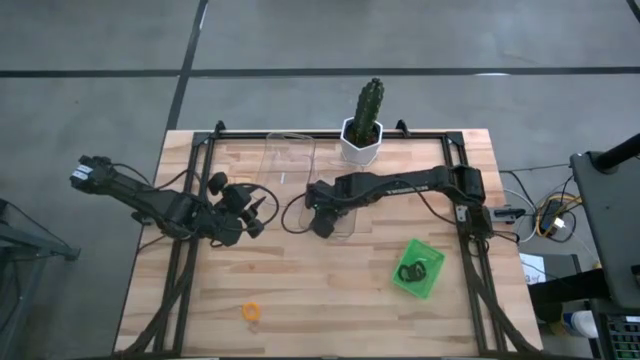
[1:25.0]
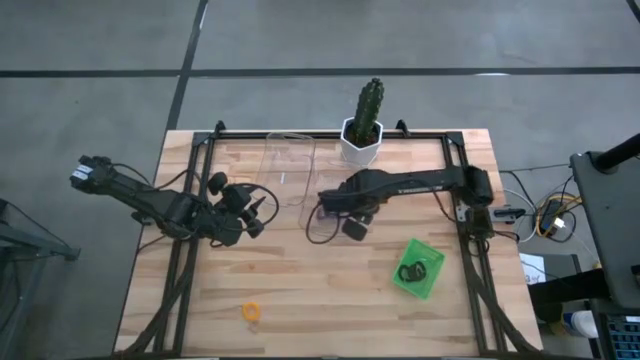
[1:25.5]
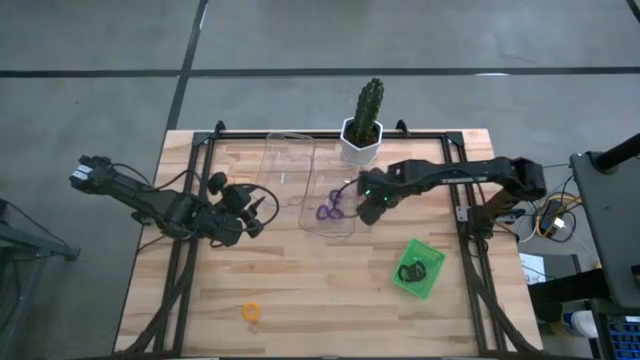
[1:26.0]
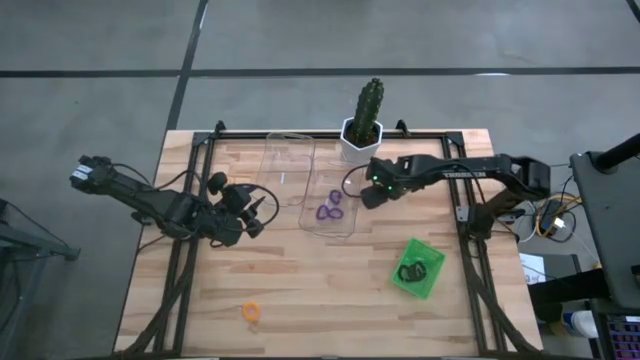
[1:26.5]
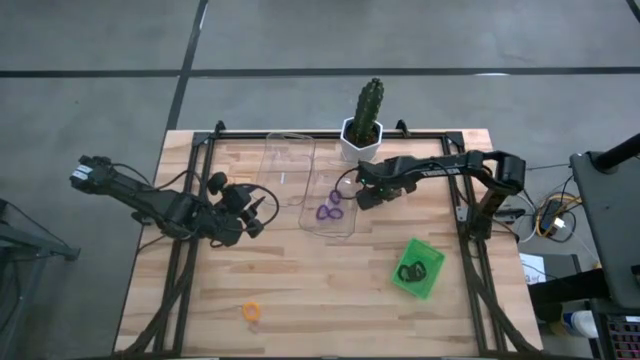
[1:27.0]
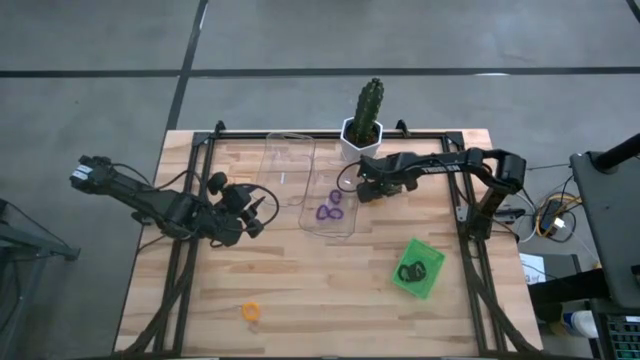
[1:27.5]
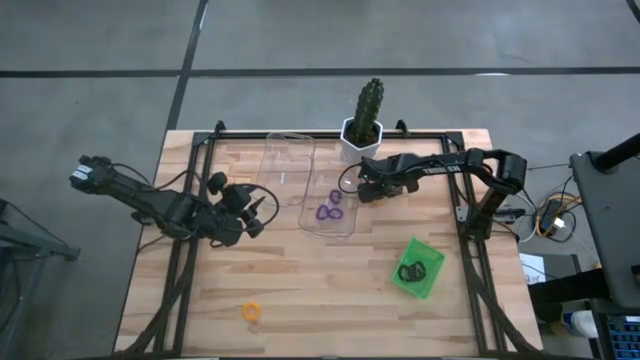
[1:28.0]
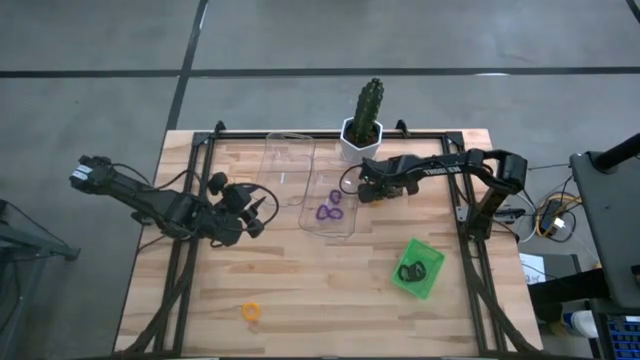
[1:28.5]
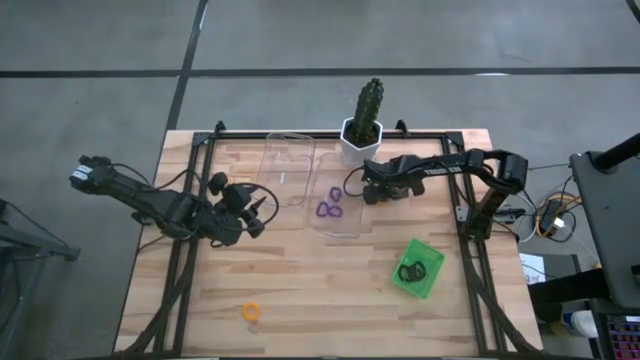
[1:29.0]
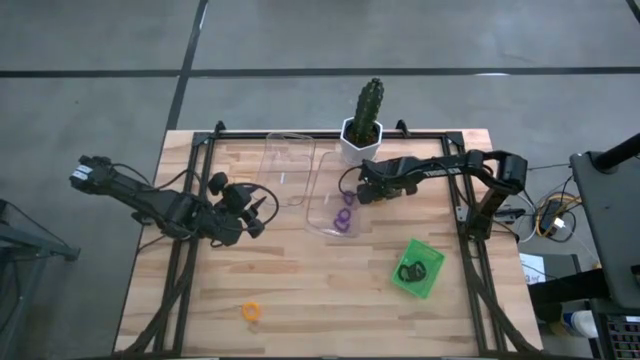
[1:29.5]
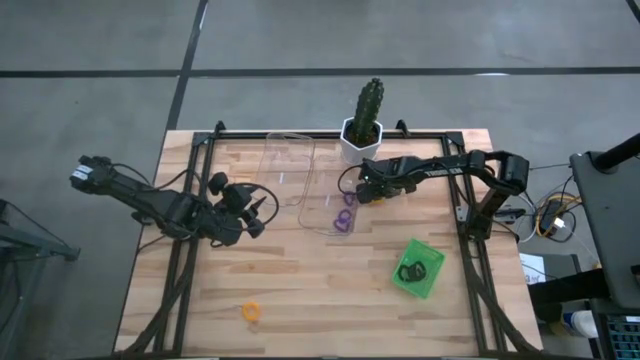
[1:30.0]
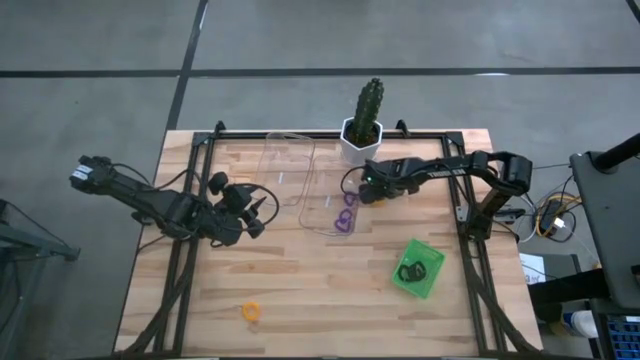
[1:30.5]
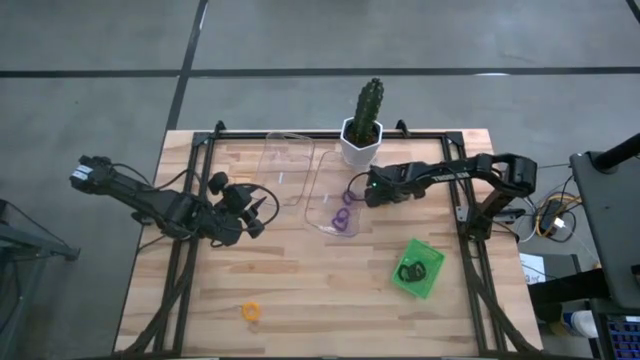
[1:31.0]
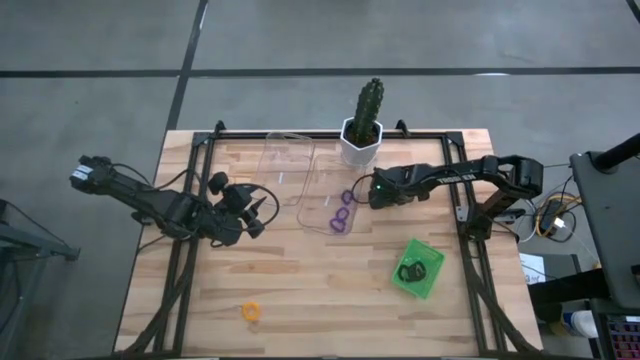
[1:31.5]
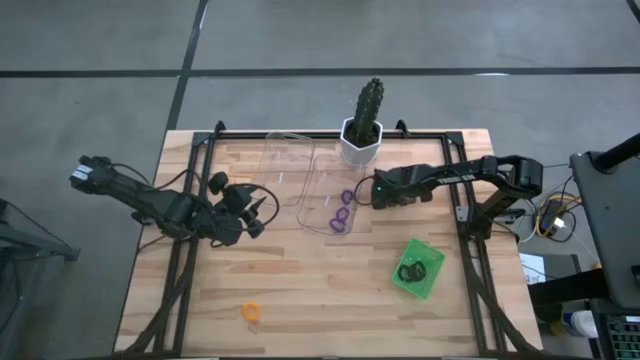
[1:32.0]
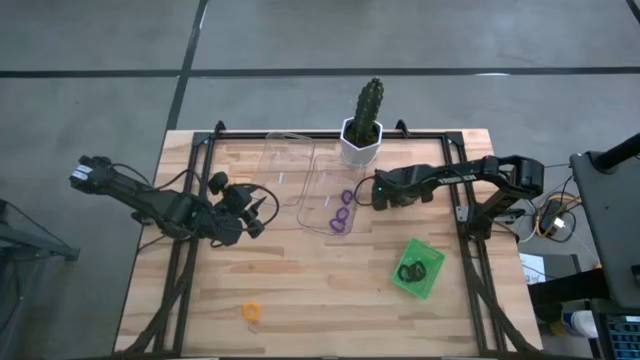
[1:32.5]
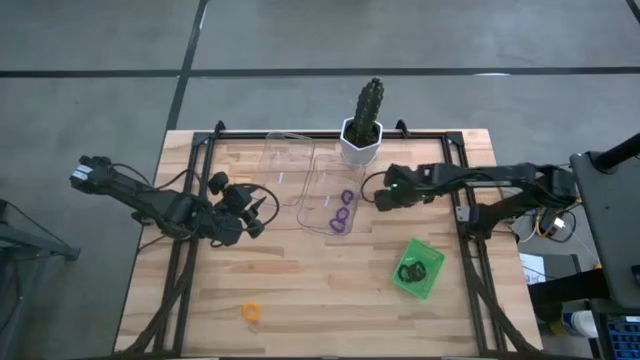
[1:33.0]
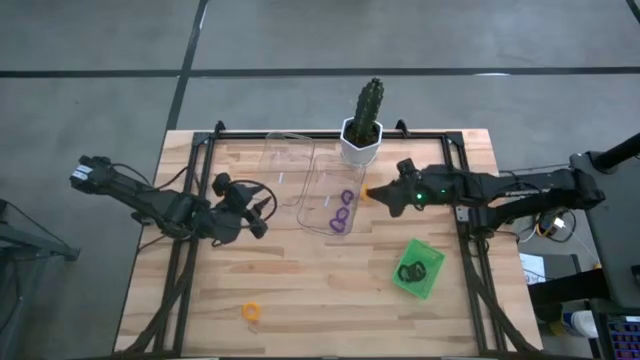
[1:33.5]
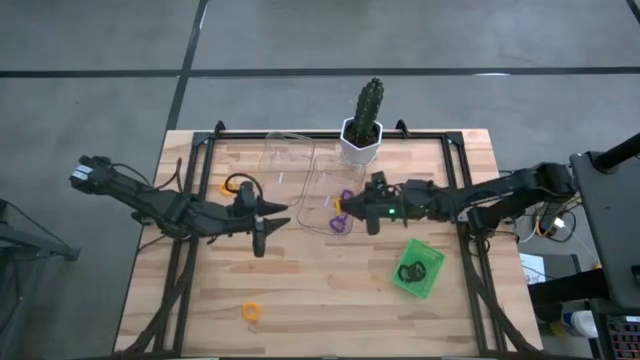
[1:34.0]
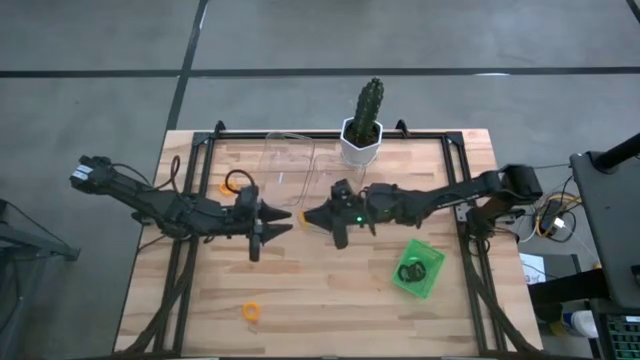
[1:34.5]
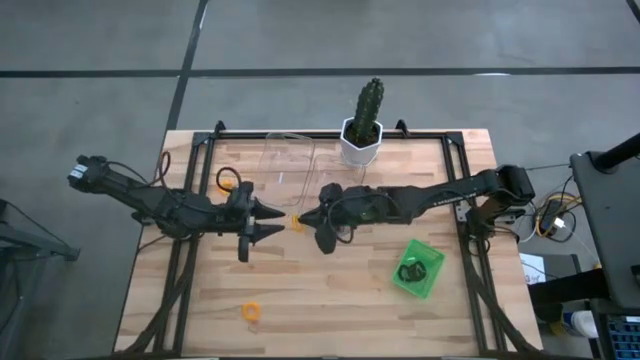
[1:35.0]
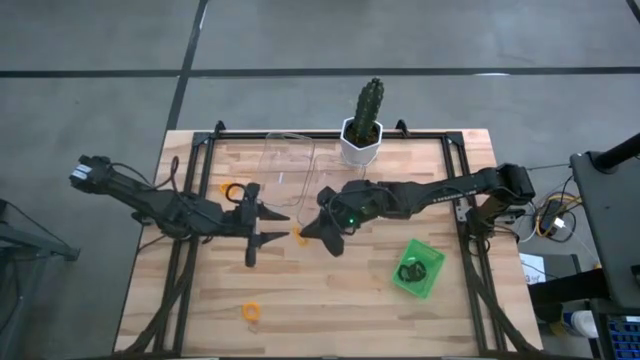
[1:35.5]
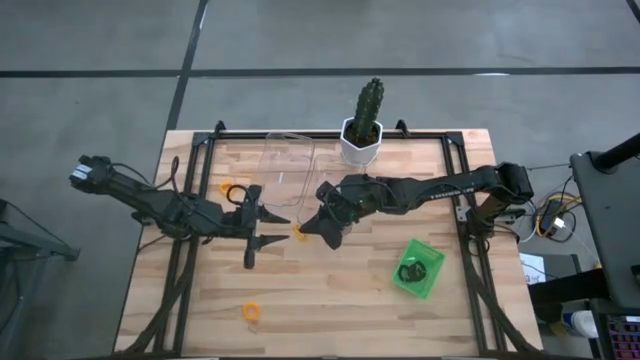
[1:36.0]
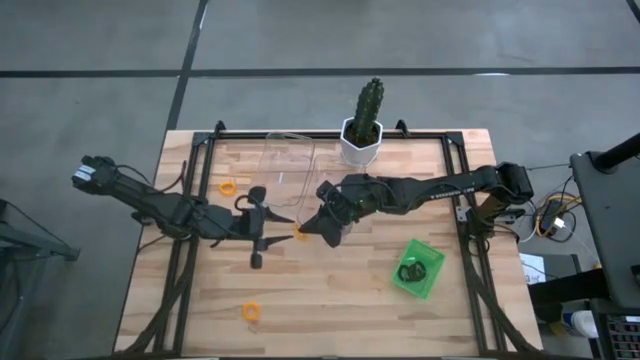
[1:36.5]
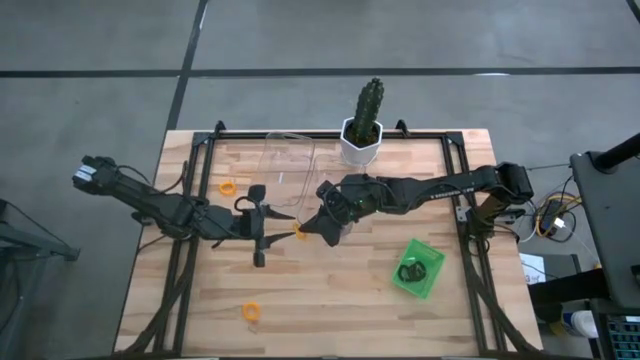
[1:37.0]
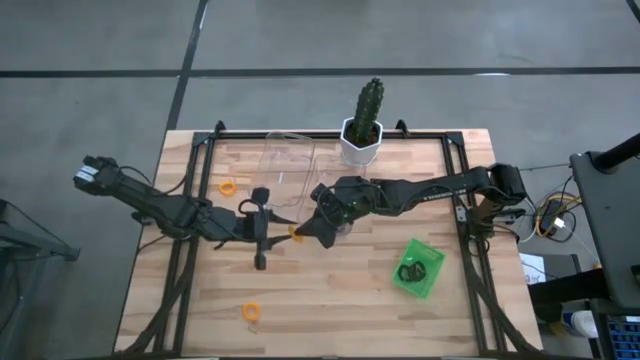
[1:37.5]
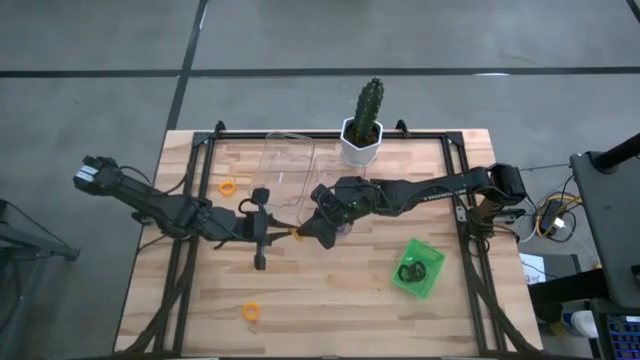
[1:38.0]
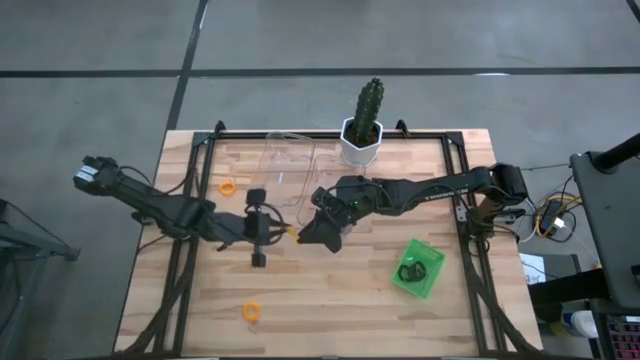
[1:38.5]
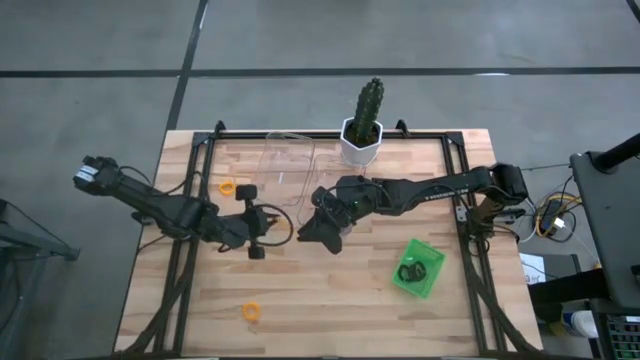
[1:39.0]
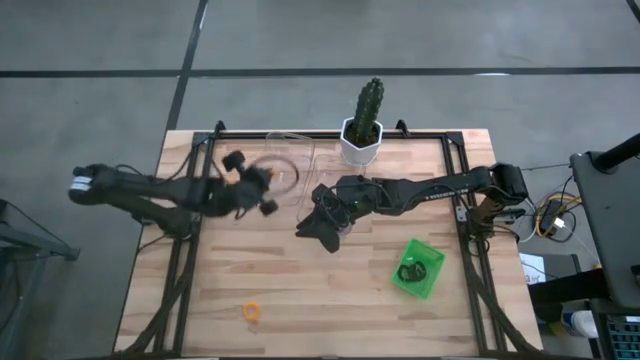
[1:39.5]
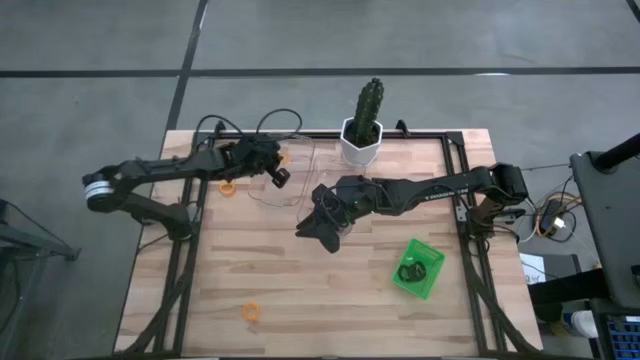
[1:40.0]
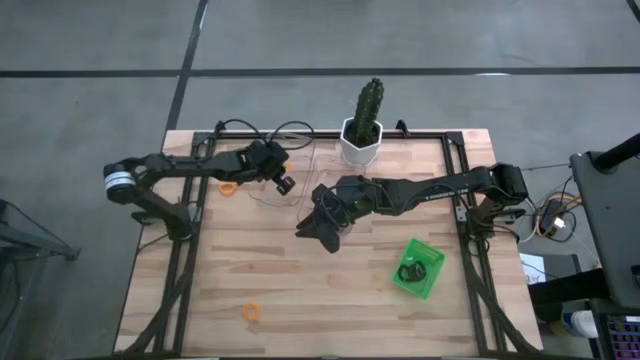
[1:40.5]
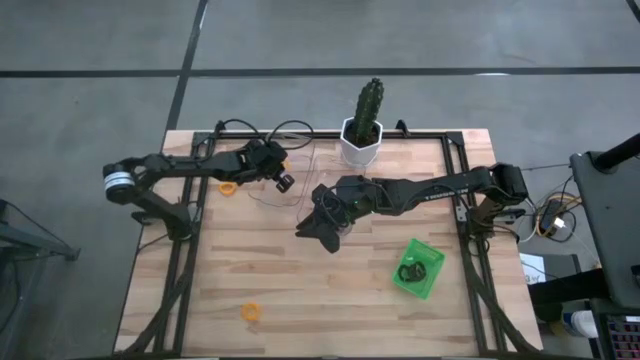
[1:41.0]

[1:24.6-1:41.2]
Task: Sort spring keychains
Put the right yellow spring keychain into the left transparent bin

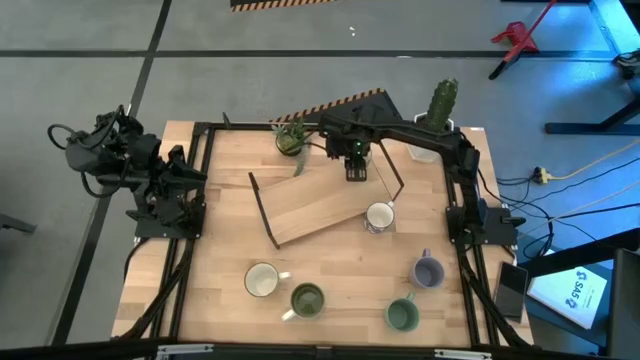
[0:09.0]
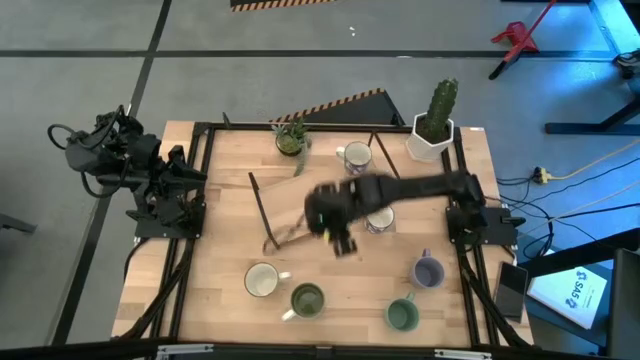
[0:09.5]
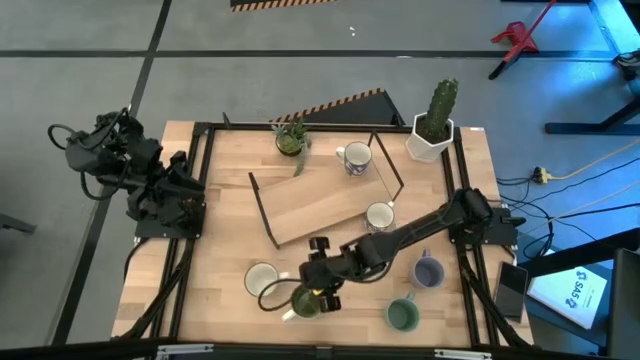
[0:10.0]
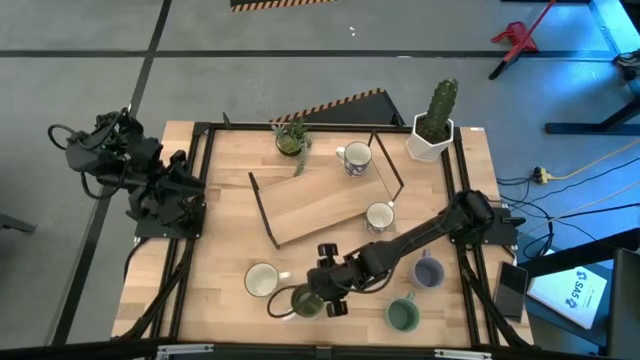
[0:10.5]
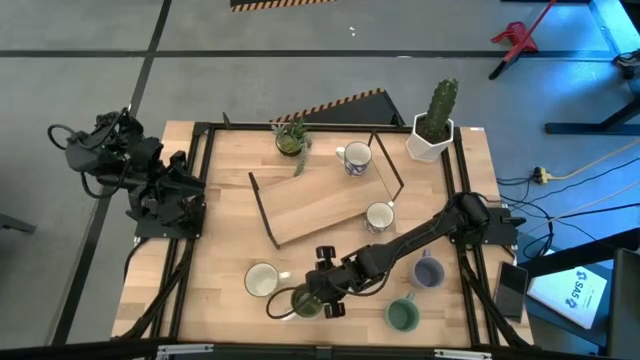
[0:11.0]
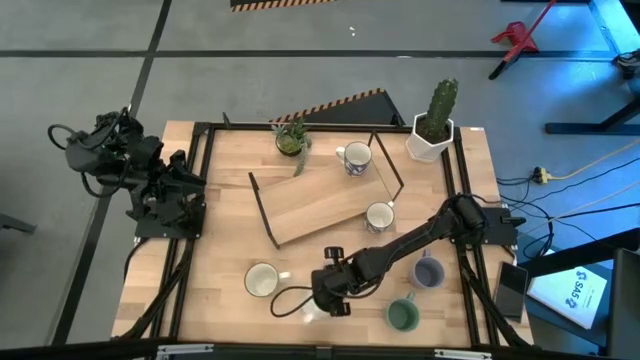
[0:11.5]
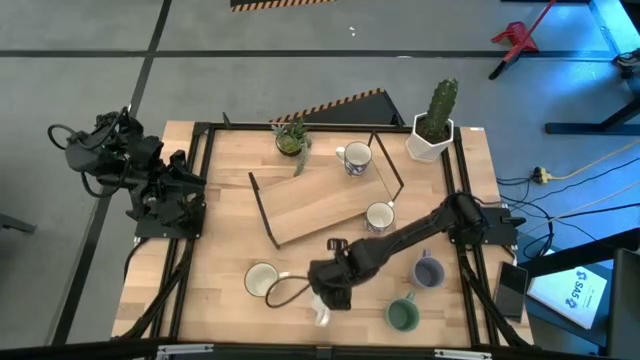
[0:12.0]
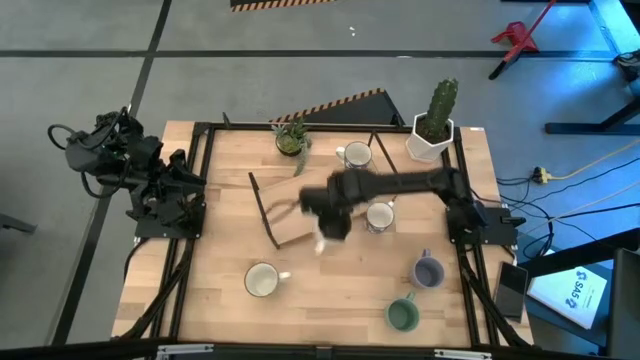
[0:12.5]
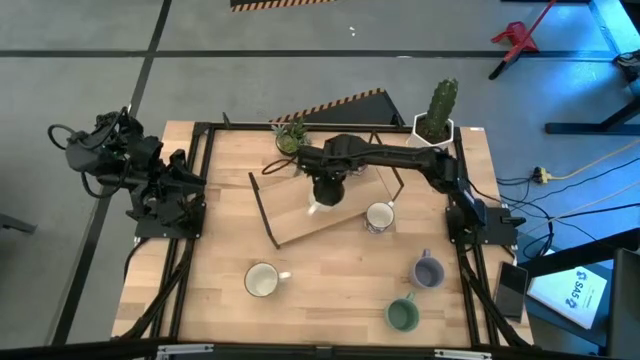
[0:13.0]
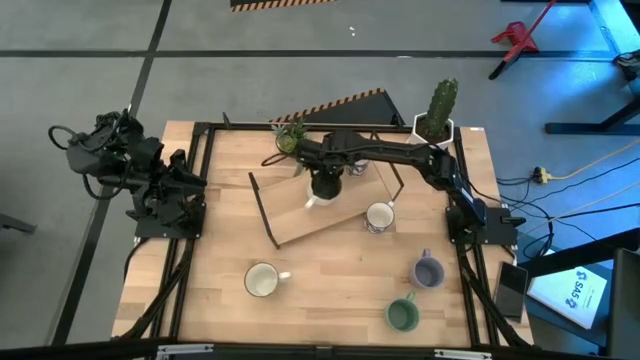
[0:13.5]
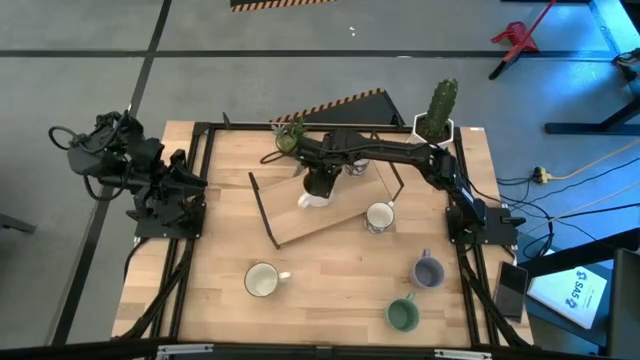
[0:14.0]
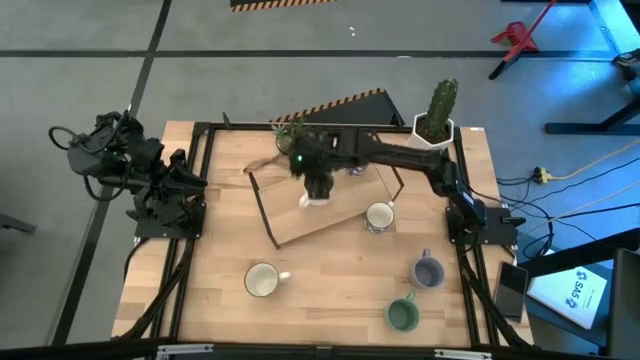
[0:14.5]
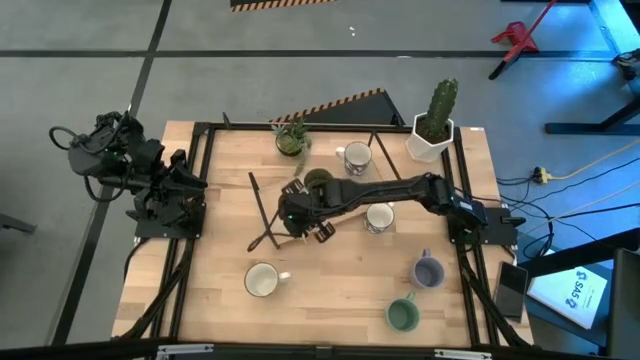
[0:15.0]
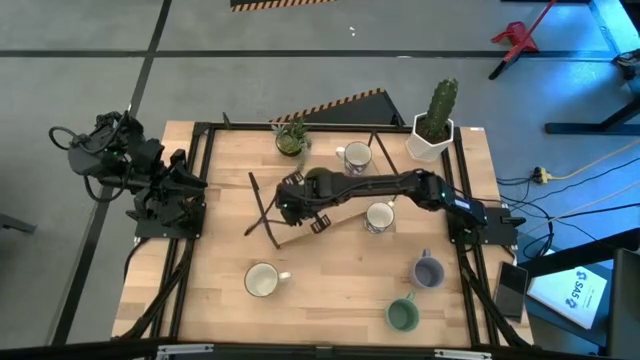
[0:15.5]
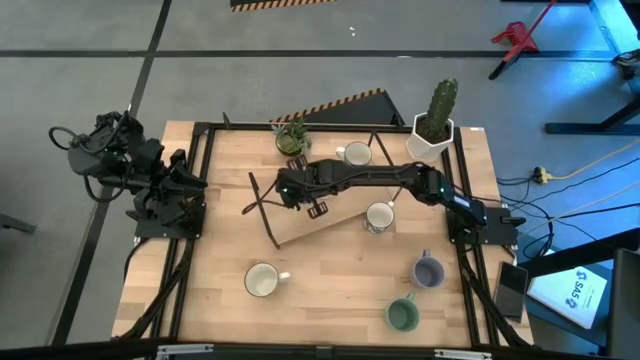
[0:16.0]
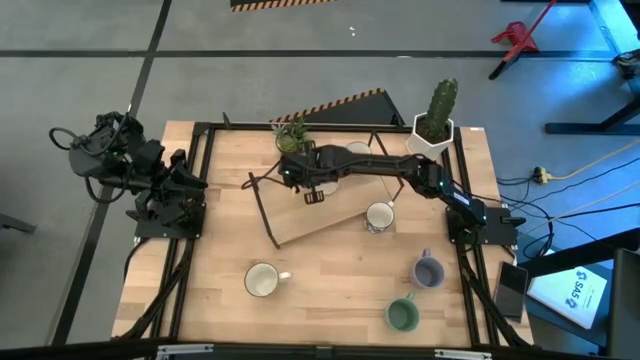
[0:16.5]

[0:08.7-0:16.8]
Task: Place coffee mugs
Put the white mug on the shelf
